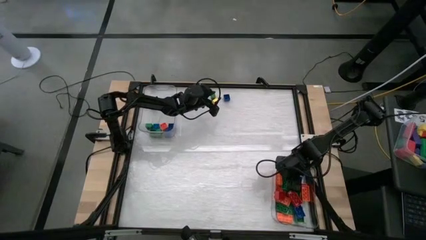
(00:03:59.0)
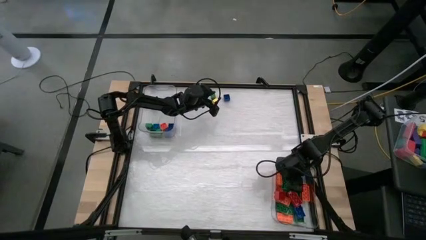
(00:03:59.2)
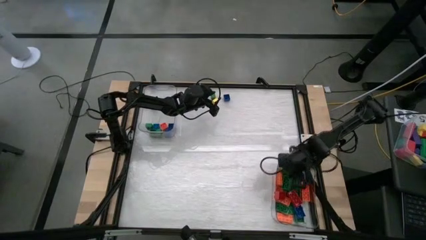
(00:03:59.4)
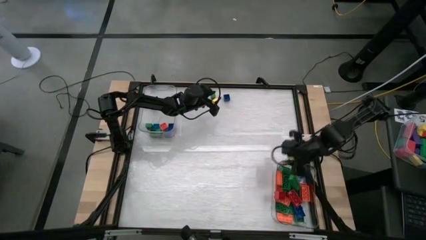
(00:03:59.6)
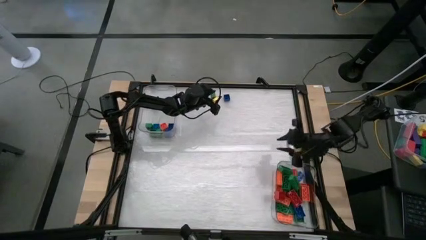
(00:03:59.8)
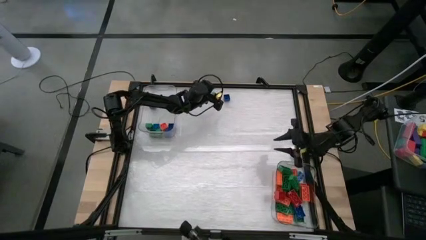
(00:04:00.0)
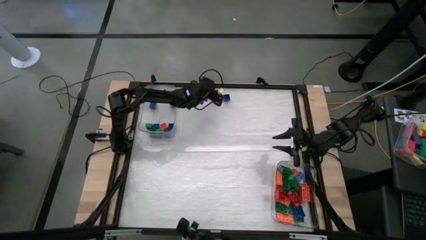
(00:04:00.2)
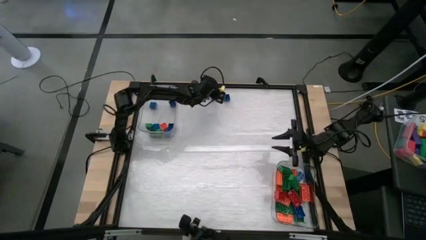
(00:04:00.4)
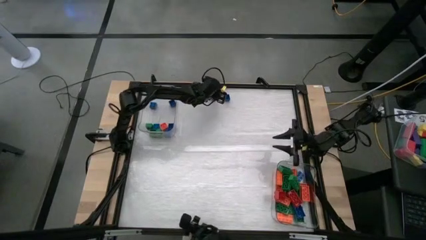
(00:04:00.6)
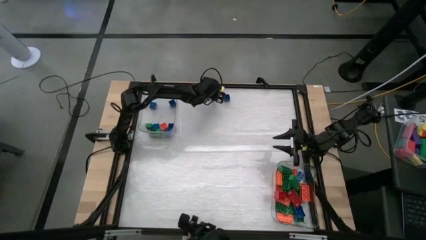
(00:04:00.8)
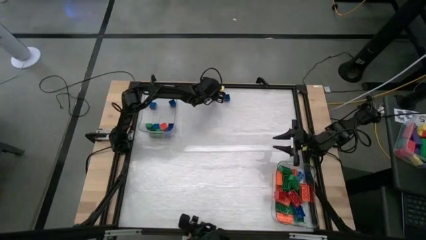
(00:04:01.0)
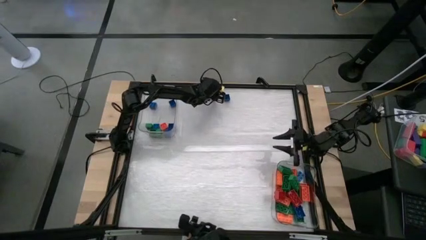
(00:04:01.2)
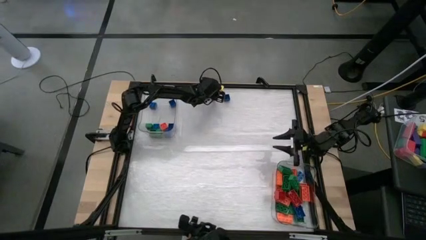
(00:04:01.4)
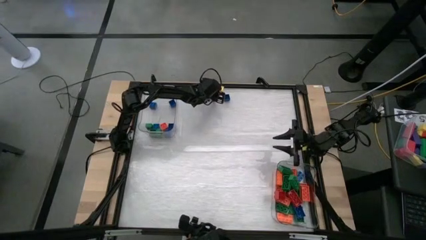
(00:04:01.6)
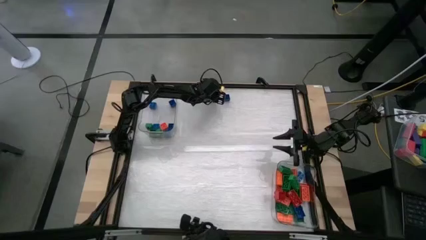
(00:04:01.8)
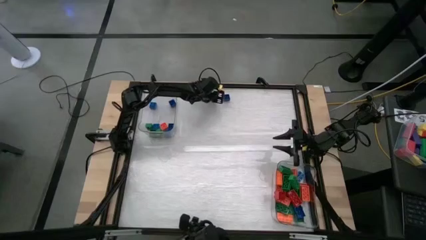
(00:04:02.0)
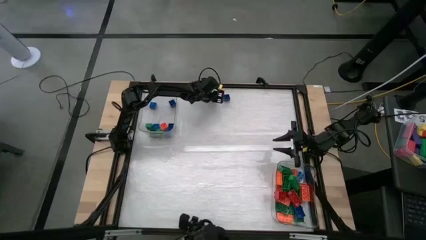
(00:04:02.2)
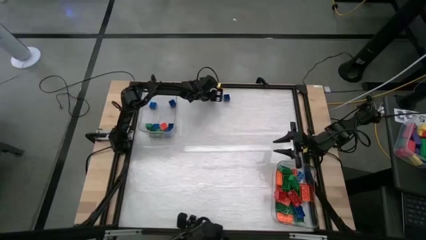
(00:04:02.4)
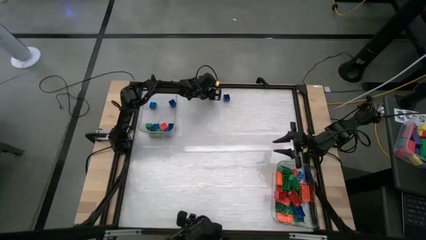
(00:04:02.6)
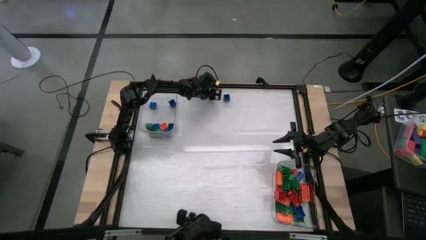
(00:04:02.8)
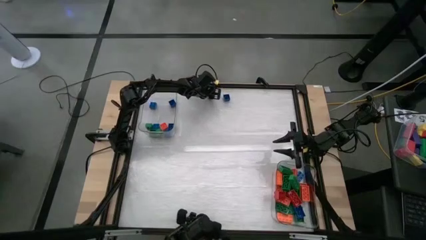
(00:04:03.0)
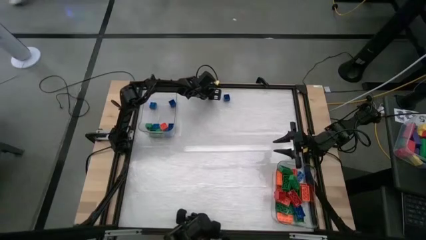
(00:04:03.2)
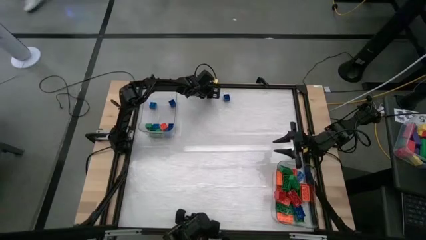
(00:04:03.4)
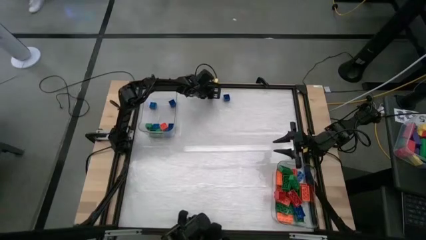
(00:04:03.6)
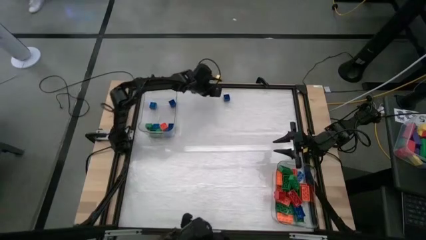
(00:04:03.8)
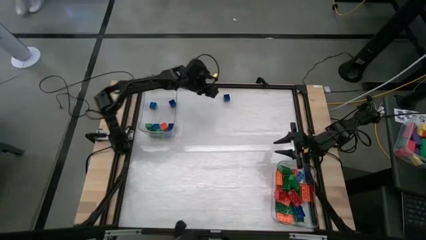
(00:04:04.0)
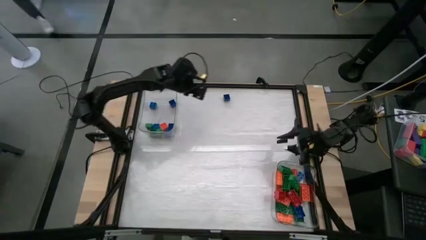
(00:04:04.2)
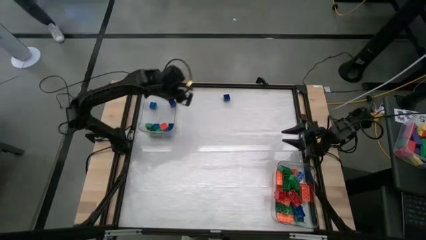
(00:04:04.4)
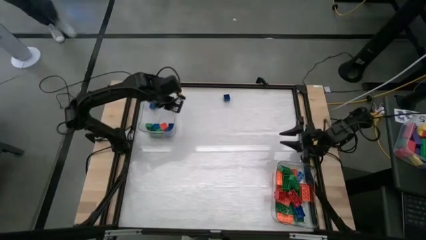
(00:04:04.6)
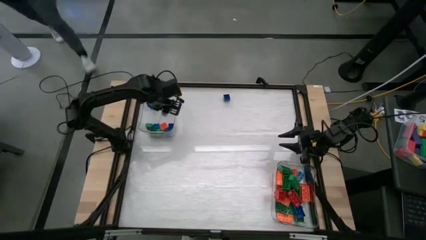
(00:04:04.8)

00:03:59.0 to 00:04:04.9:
Task: Sort blocks by size
Put the 4 stud green game piece into the top transparent bin

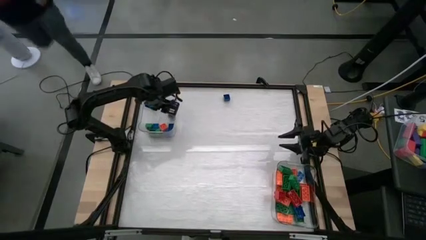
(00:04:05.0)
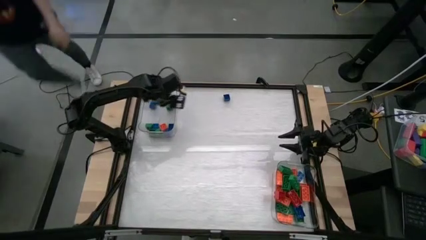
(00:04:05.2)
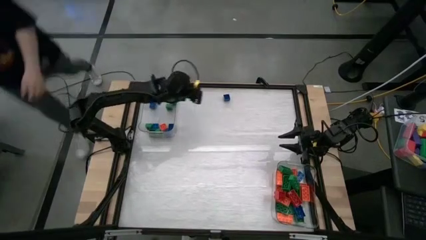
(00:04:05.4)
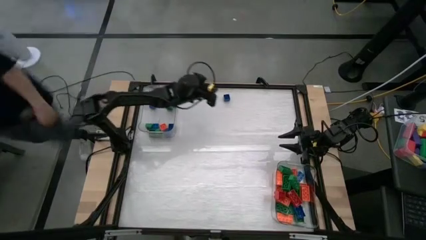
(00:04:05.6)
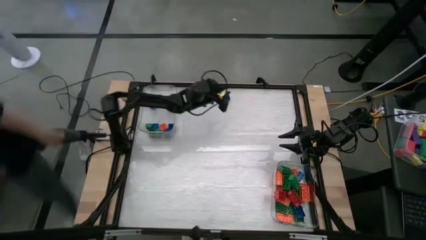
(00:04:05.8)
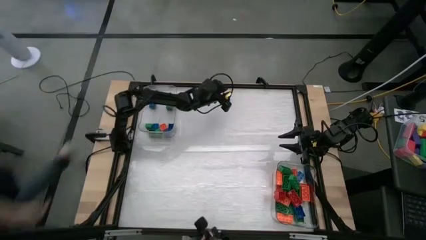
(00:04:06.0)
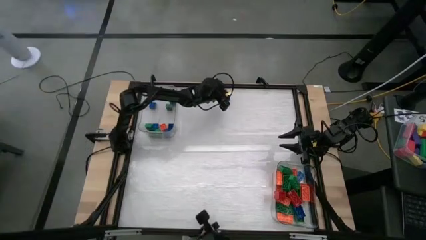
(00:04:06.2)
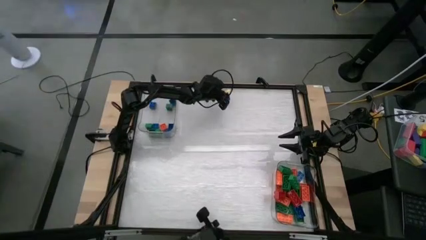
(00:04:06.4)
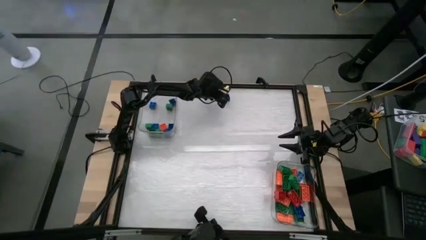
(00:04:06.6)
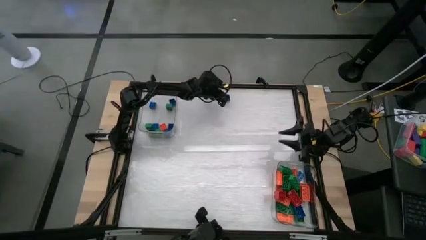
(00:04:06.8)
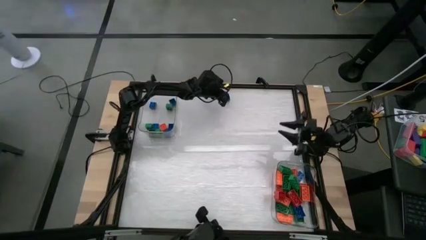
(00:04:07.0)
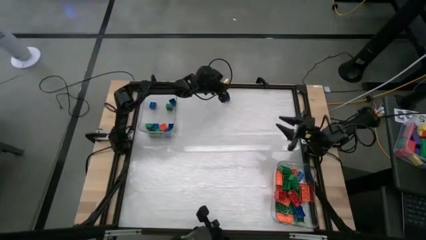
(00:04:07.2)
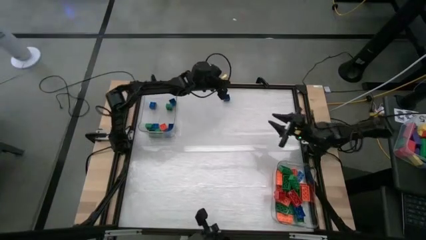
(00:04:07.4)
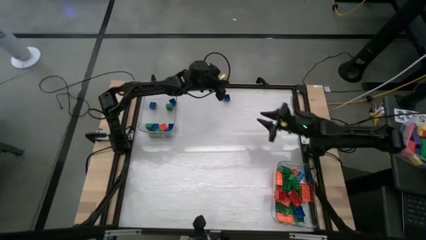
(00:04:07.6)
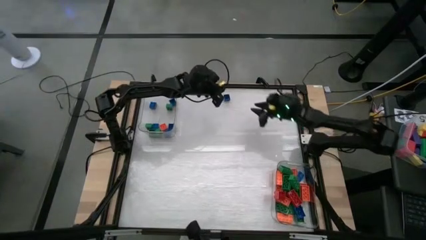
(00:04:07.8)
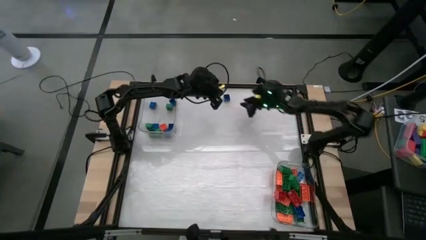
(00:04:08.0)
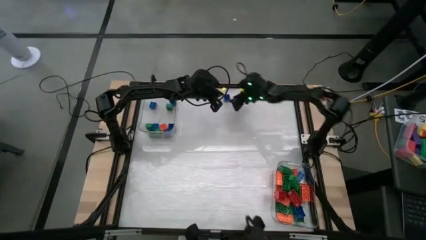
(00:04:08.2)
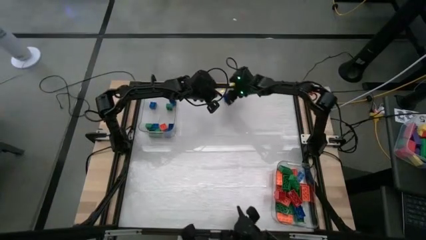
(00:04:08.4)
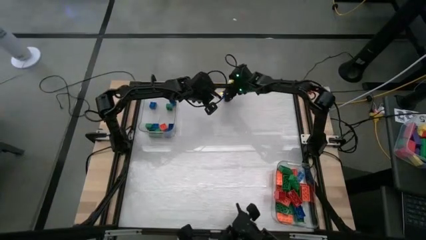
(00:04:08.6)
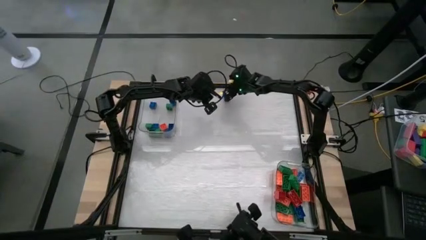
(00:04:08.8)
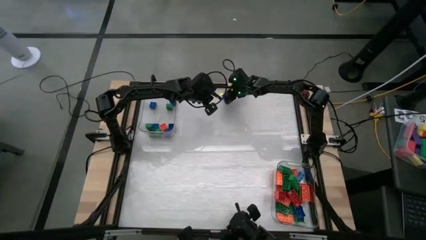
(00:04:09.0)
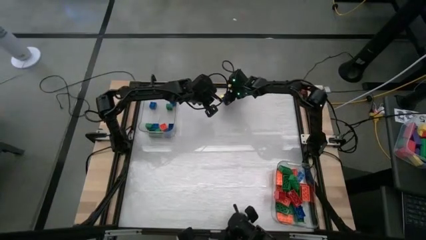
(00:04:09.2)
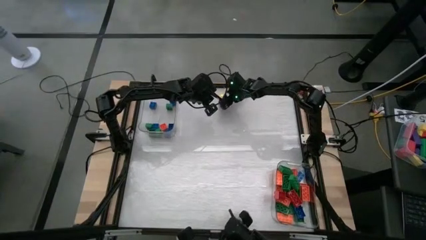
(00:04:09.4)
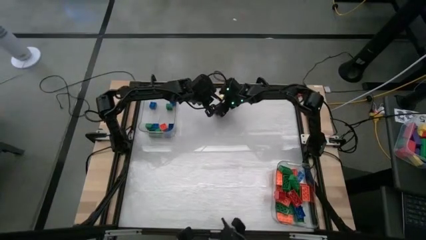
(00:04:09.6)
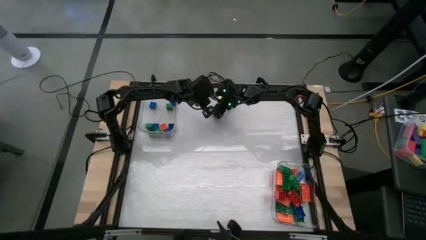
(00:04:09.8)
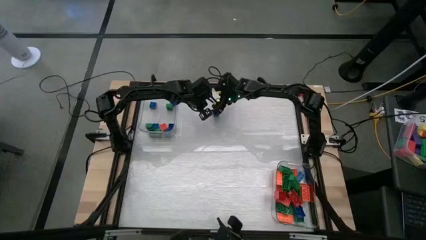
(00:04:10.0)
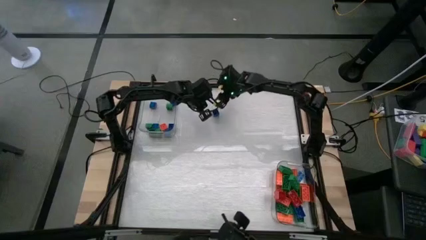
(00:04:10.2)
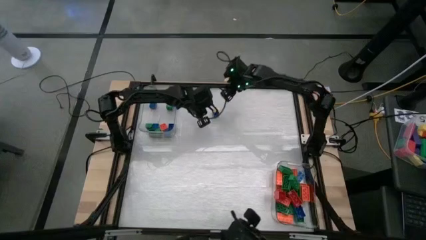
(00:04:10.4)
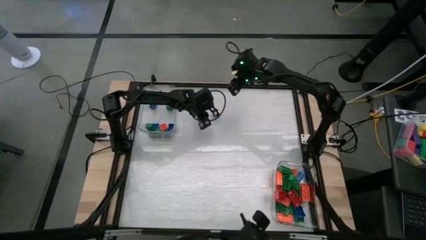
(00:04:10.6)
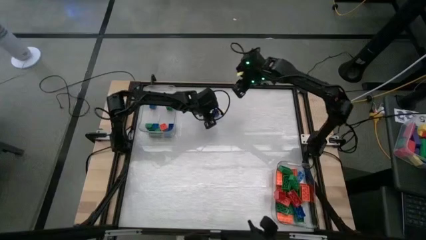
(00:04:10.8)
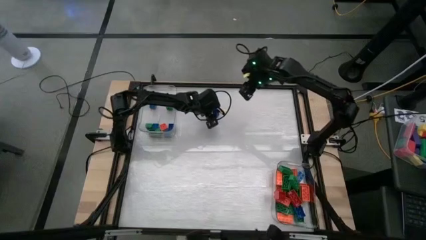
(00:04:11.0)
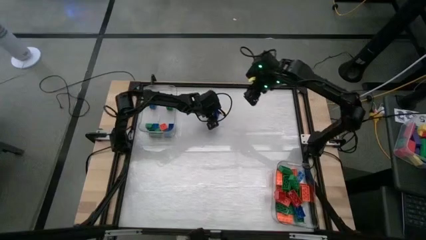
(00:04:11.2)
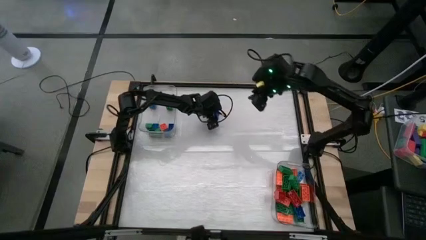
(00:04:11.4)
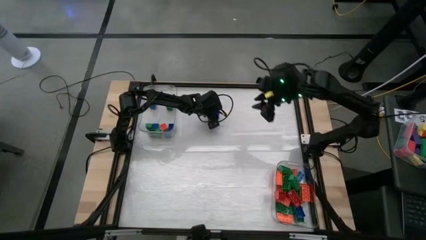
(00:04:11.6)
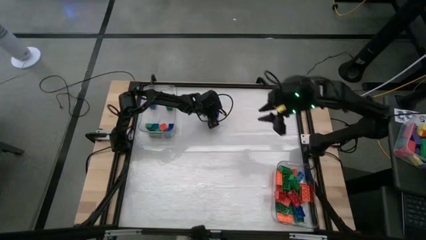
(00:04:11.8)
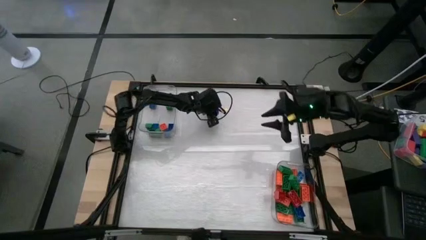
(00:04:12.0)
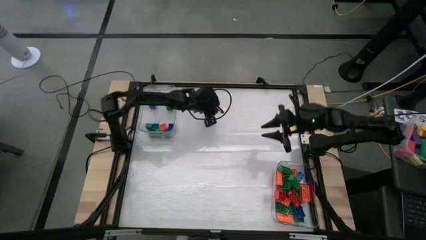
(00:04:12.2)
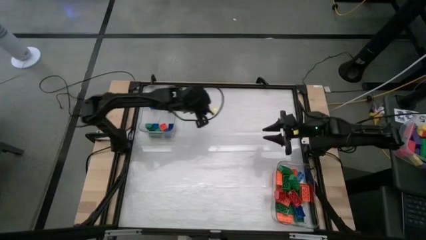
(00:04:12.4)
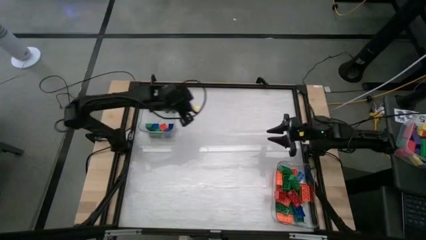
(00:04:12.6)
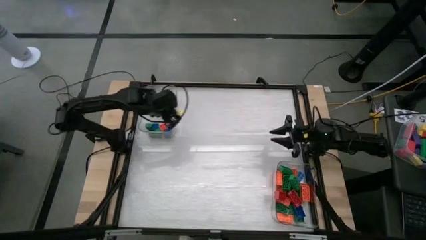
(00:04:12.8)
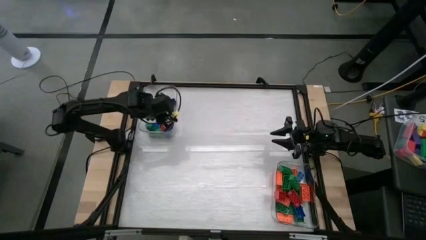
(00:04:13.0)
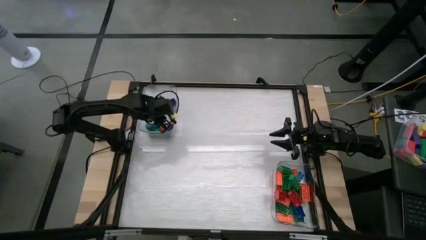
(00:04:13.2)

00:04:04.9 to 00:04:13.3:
Put the 4 stud blue game piece into the top transparent bin
